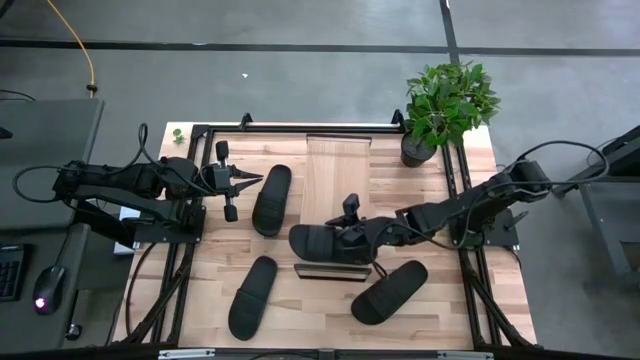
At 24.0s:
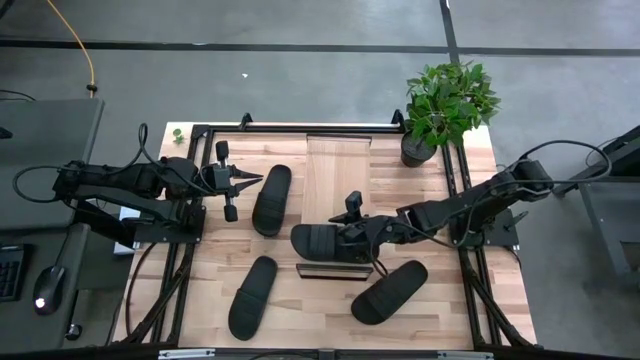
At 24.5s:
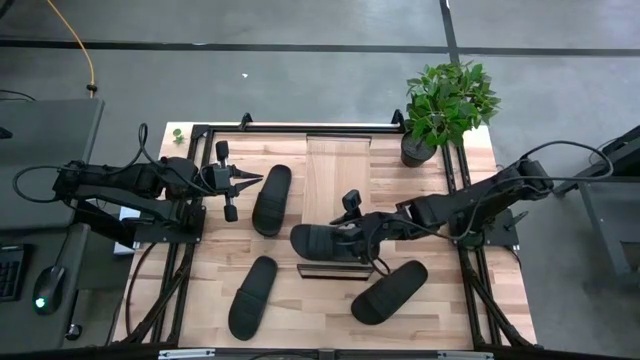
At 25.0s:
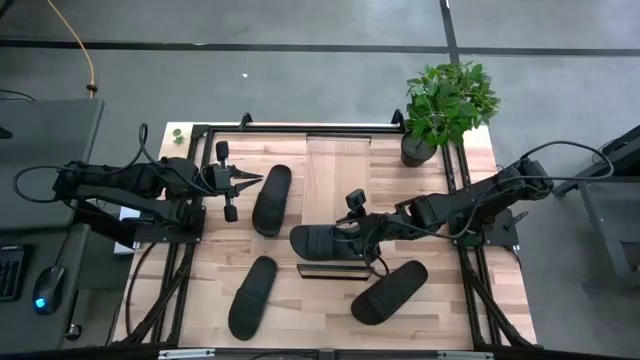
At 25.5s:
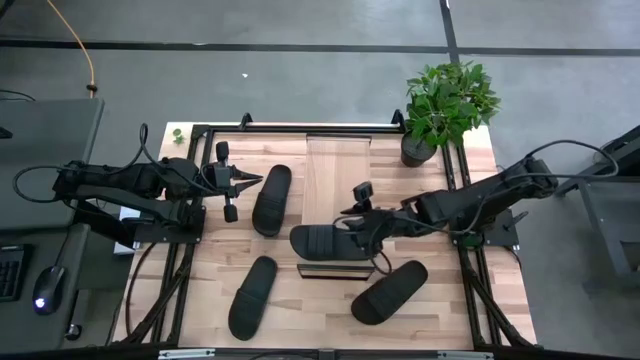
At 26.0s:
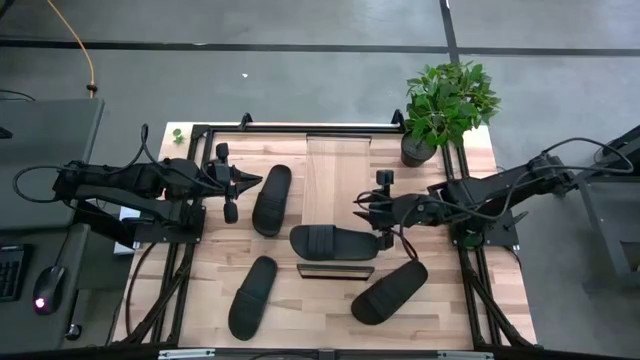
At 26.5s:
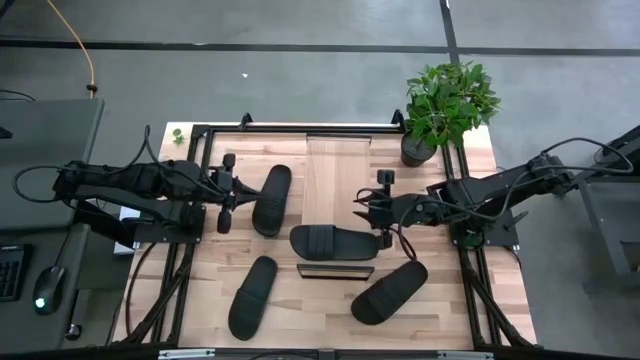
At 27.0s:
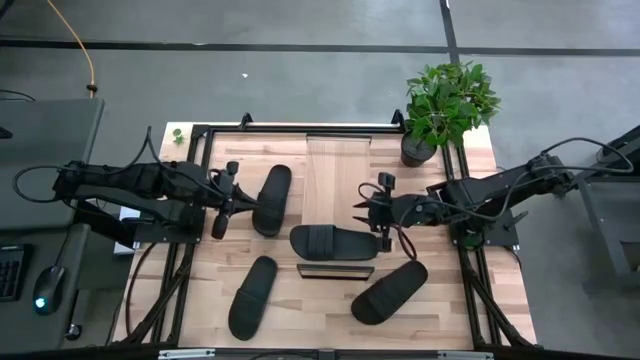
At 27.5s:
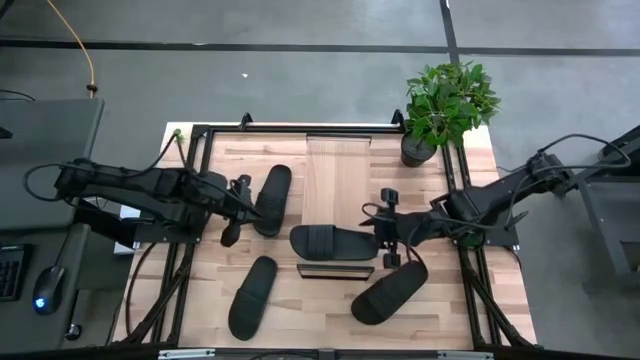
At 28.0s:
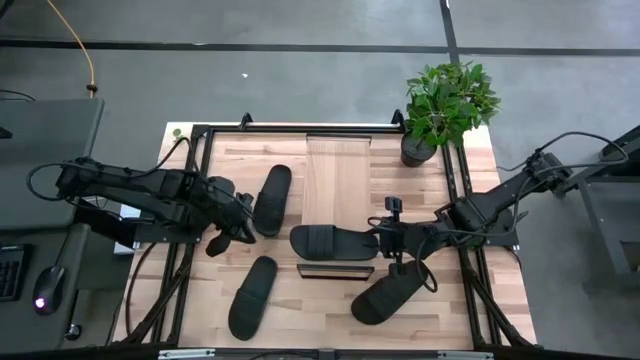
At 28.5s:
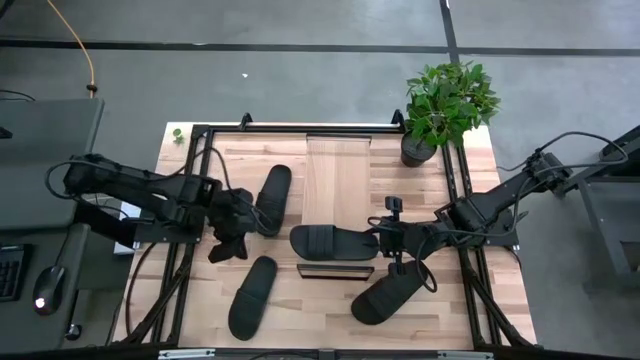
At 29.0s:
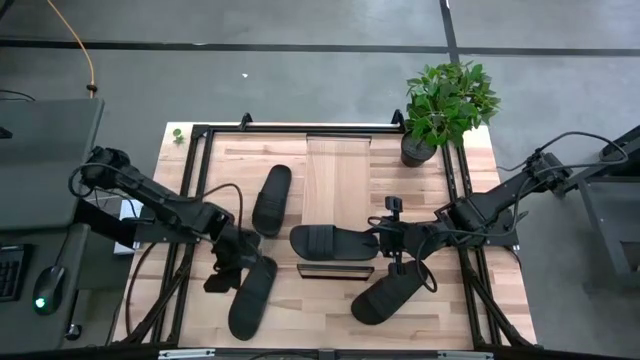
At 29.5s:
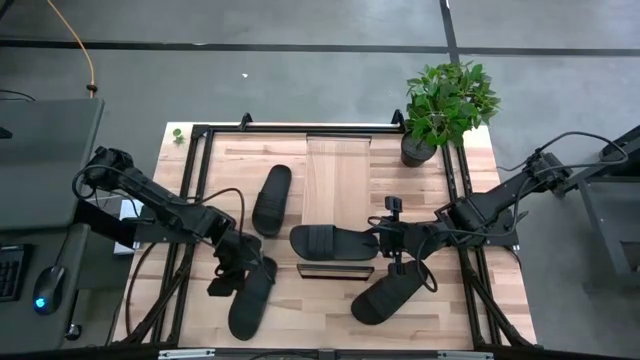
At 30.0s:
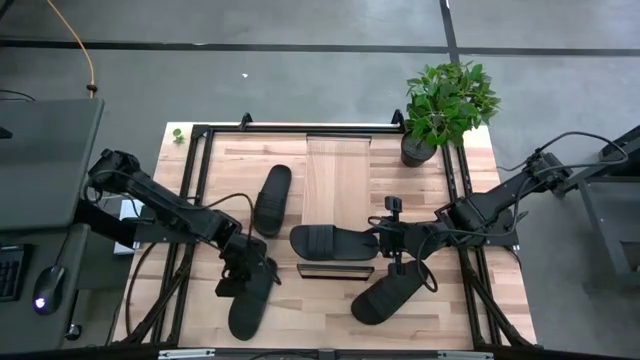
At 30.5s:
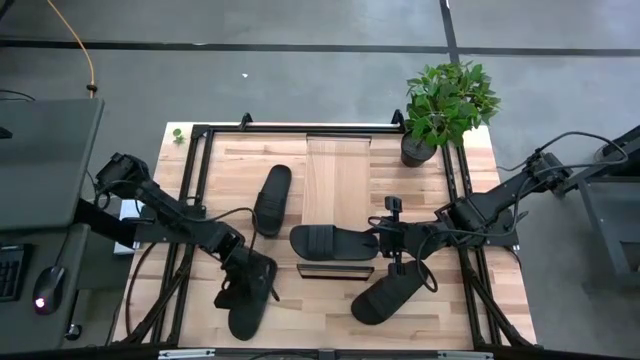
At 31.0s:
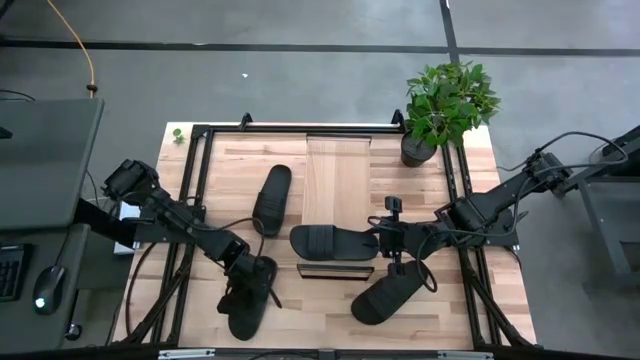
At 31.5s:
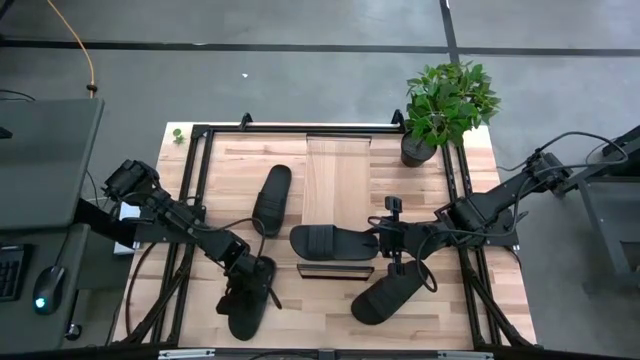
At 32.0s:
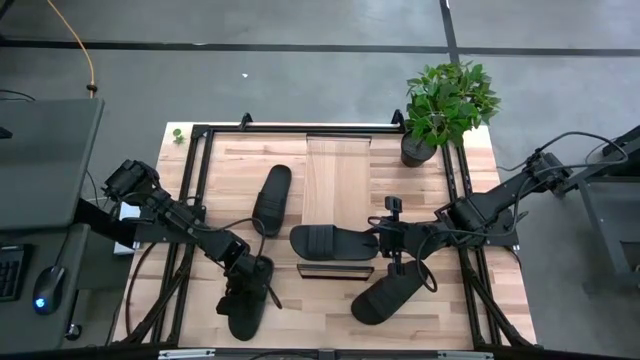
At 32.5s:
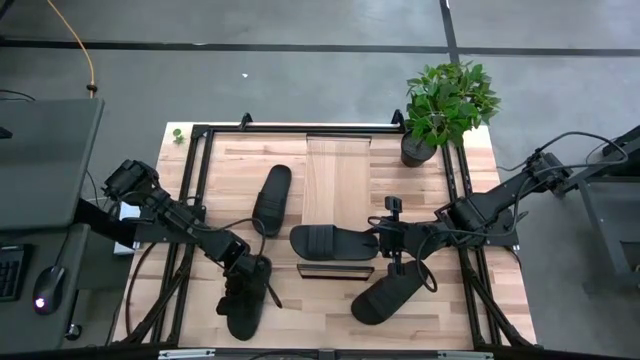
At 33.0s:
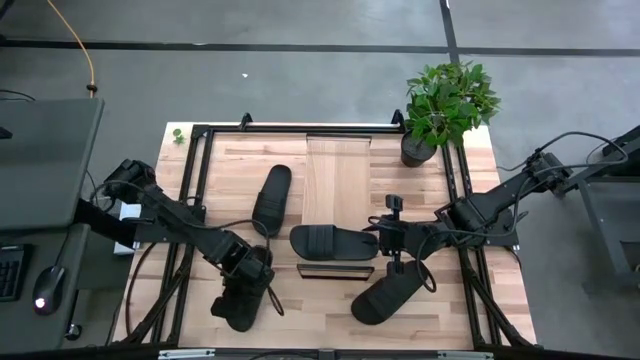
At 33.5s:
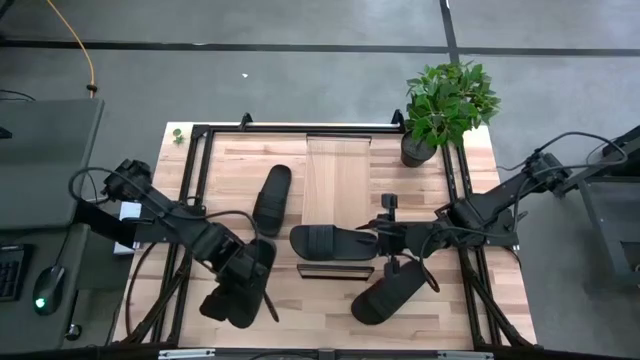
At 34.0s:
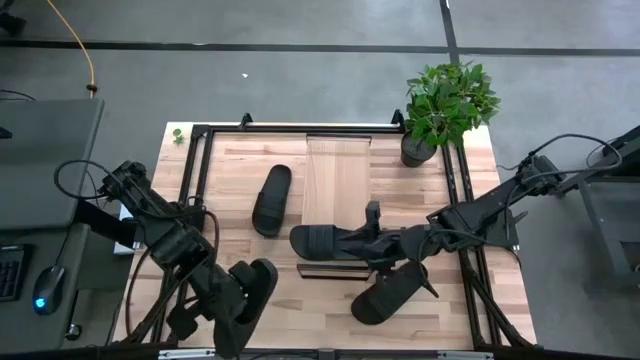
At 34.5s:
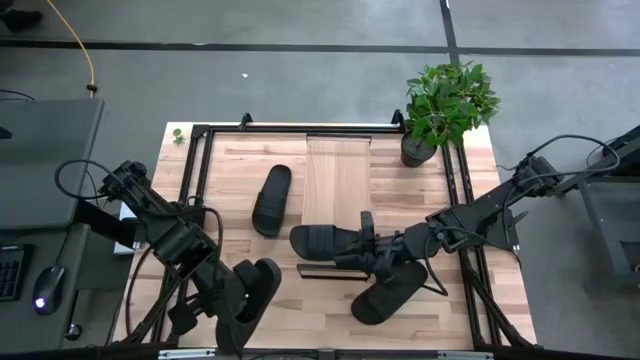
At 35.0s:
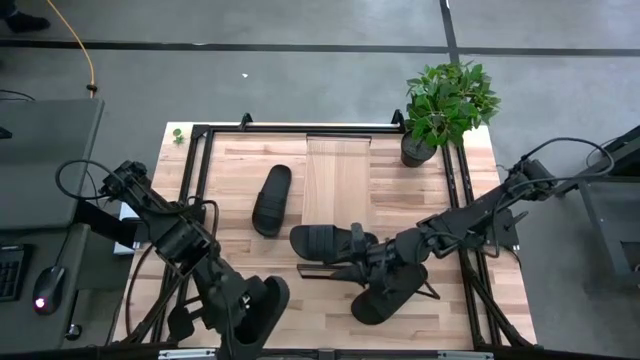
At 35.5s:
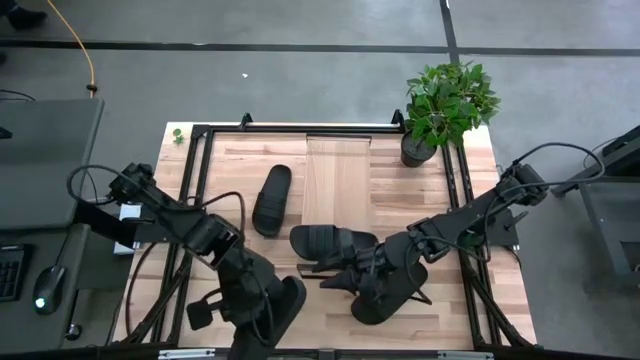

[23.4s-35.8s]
Task: Pick and place slides into the shelf
Put the bottom left black slipper on the shelf

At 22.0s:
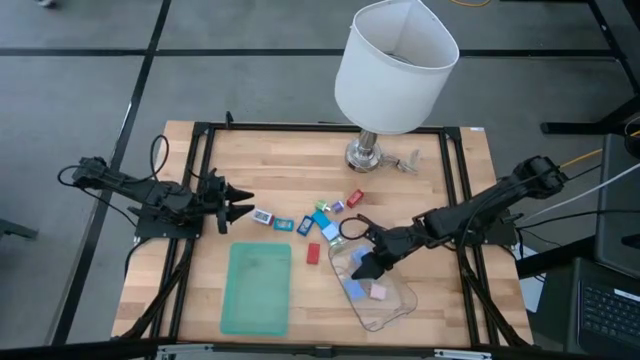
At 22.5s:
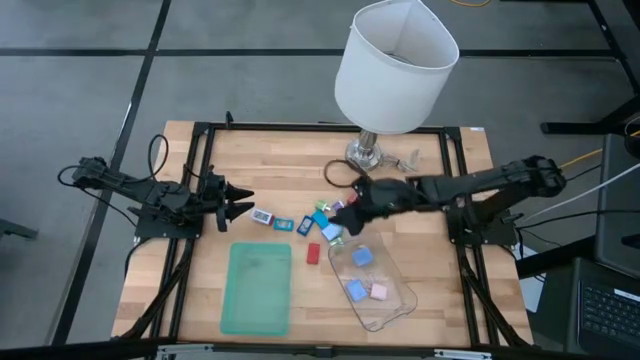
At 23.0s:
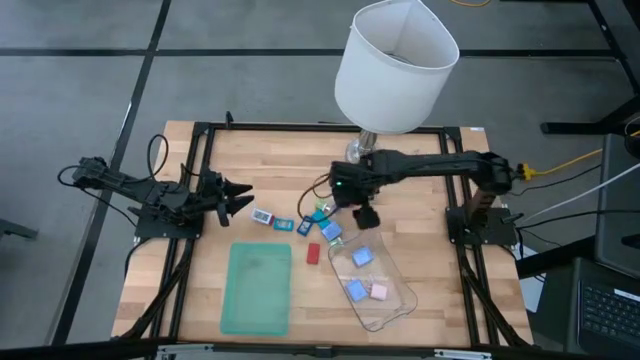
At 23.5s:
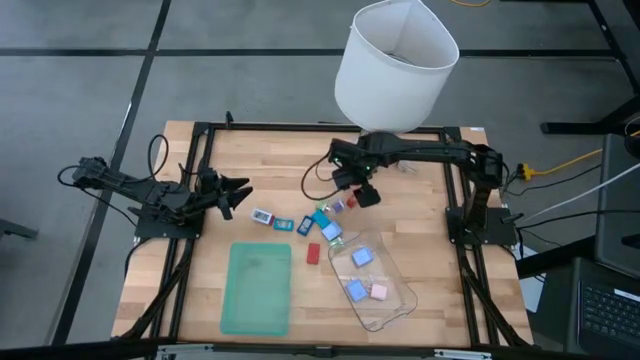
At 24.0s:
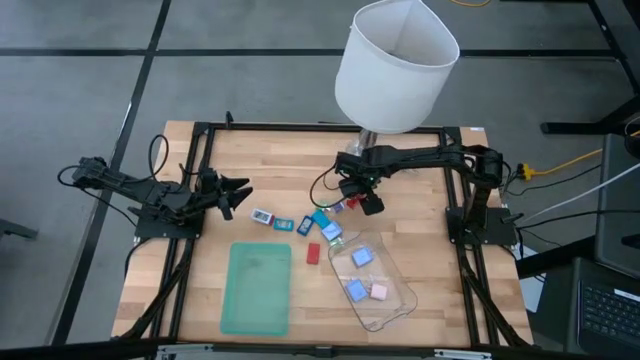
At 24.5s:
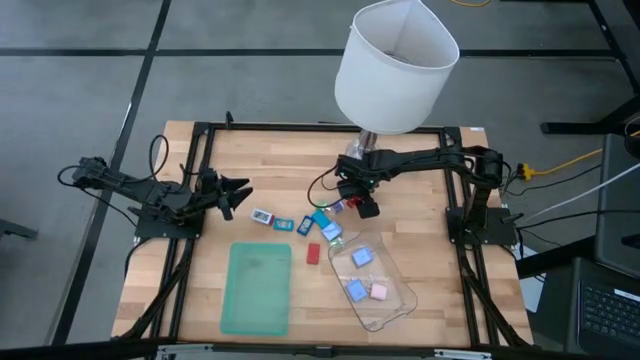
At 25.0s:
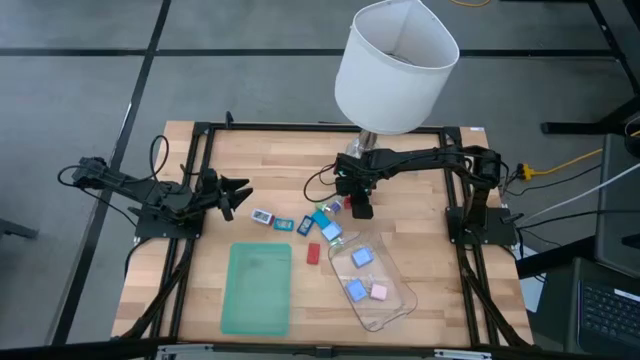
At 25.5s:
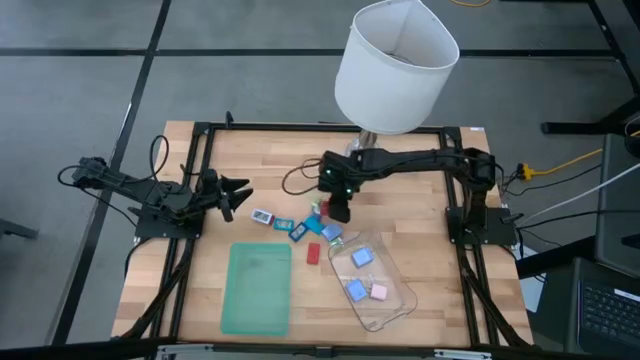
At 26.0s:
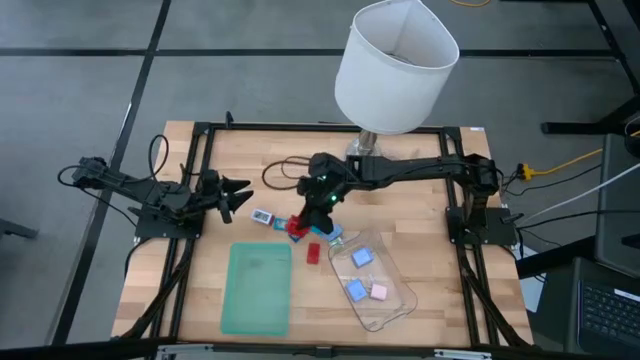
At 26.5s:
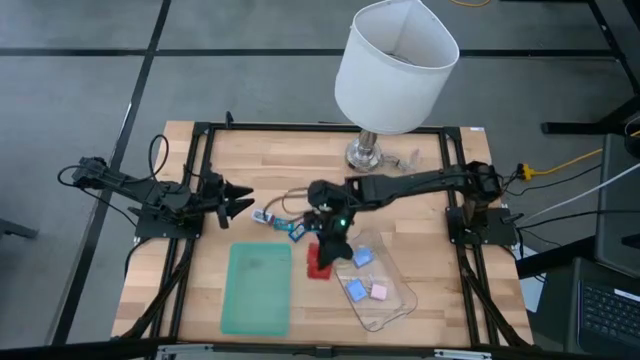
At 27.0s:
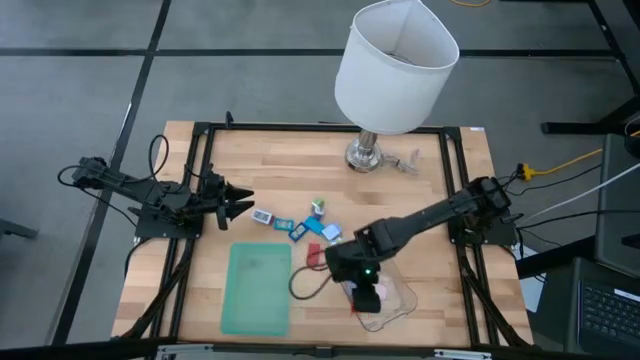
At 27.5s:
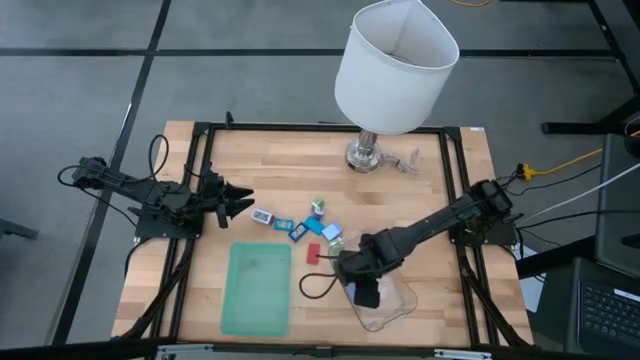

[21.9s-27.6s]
Task: Pick & Place Office items
Put the red charger adapter into the transparent bin

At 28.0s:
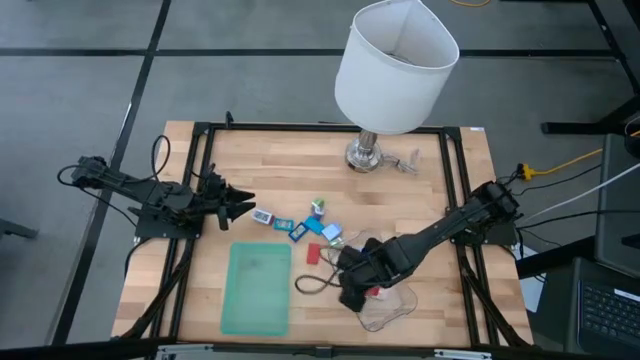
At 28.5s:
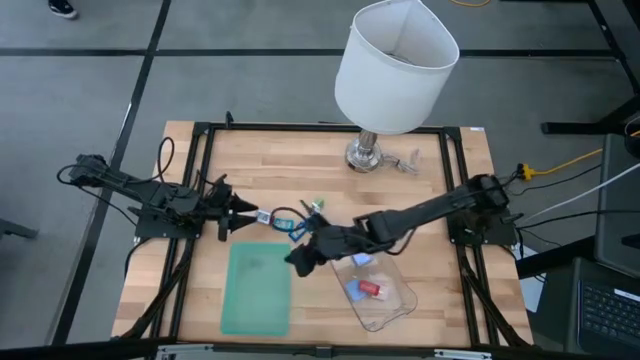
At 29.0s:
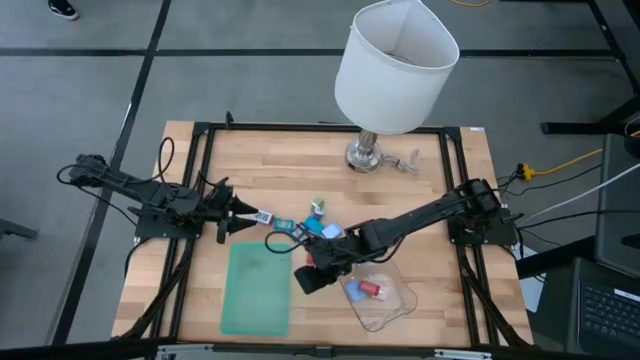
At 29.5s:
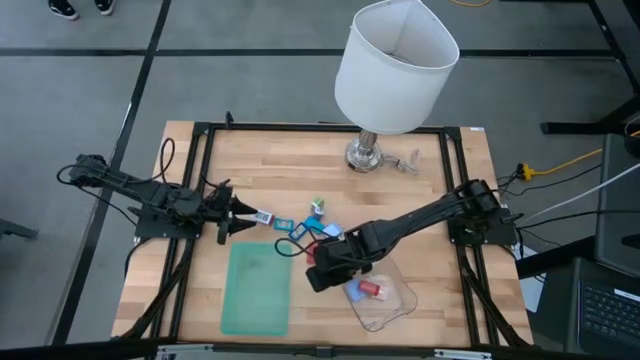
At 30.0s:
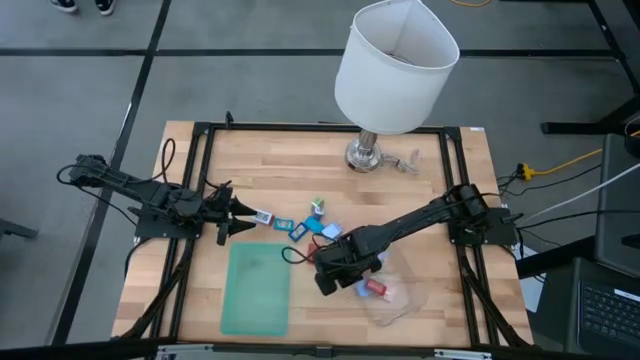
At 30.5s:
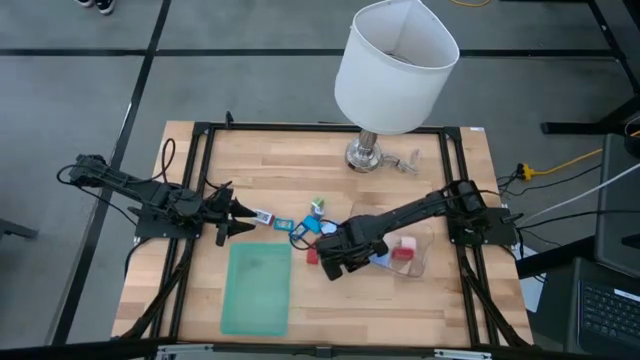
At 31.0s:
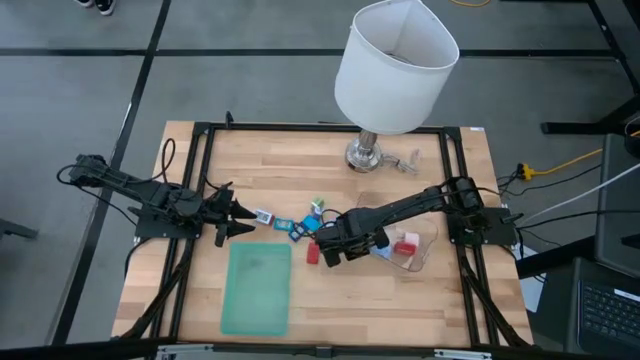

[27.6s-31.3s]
Adjust the transparent bin
